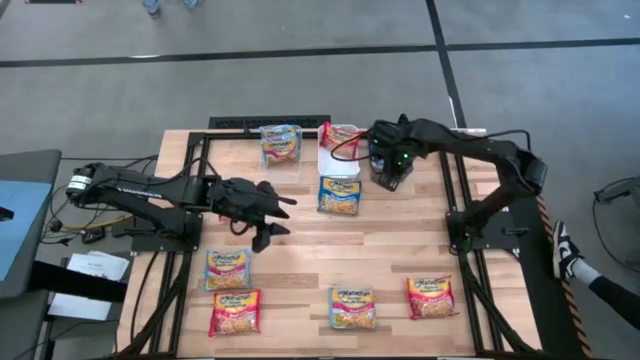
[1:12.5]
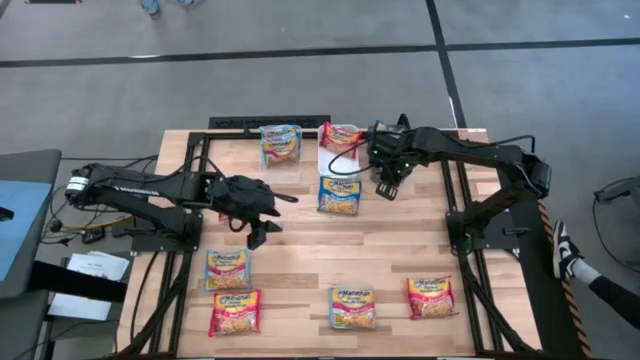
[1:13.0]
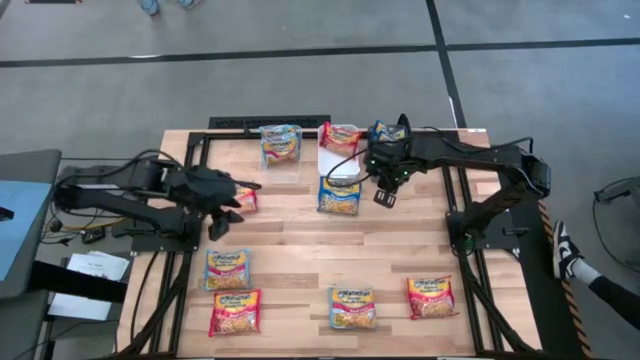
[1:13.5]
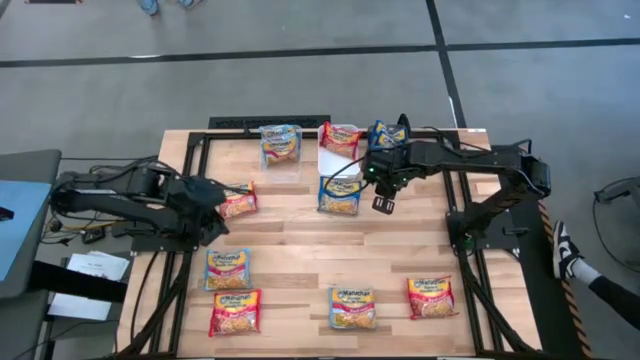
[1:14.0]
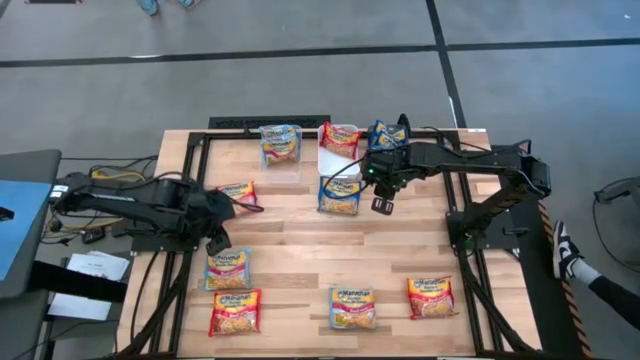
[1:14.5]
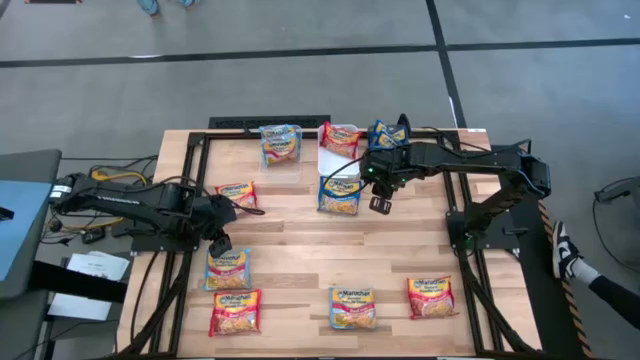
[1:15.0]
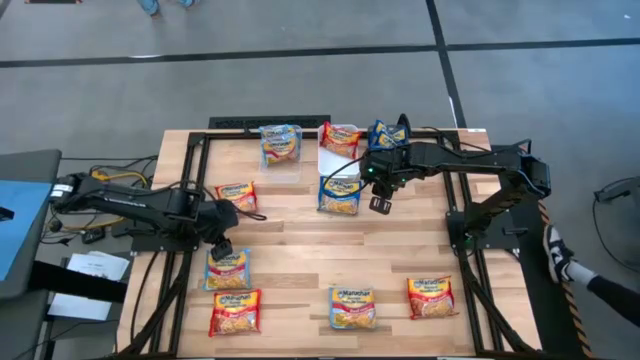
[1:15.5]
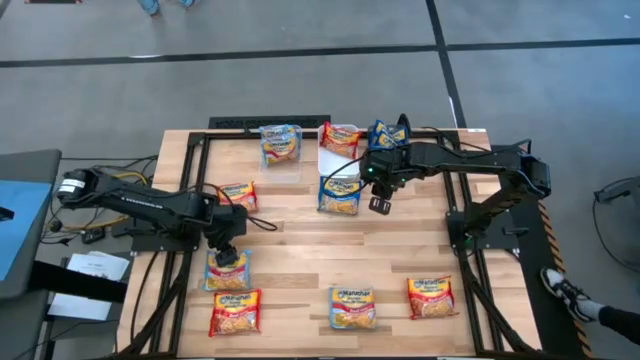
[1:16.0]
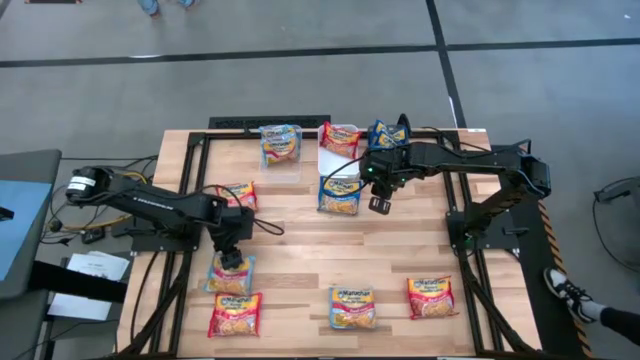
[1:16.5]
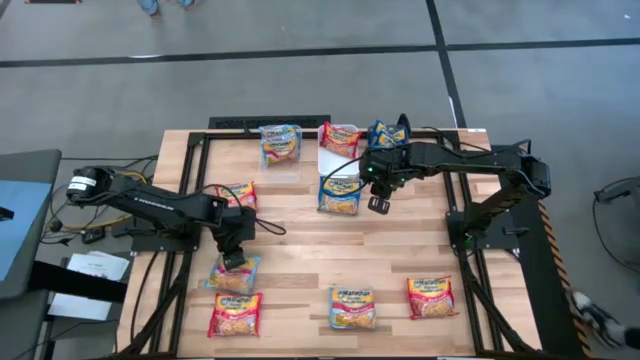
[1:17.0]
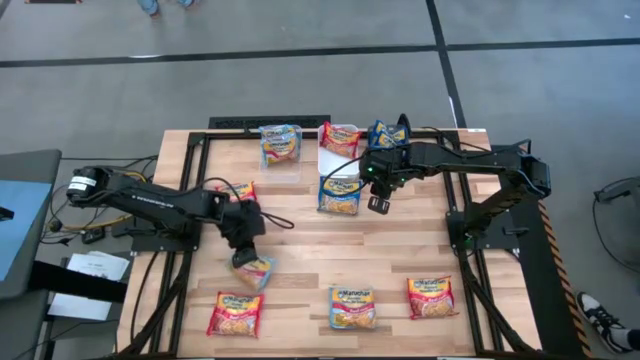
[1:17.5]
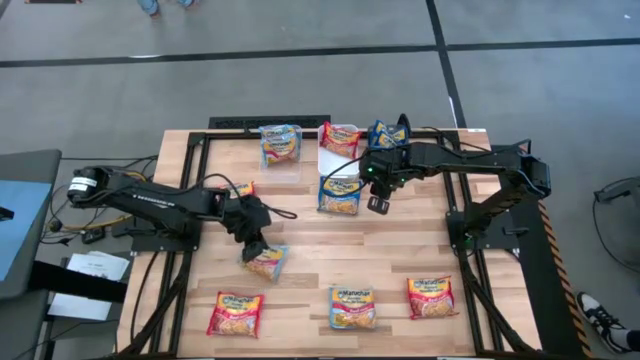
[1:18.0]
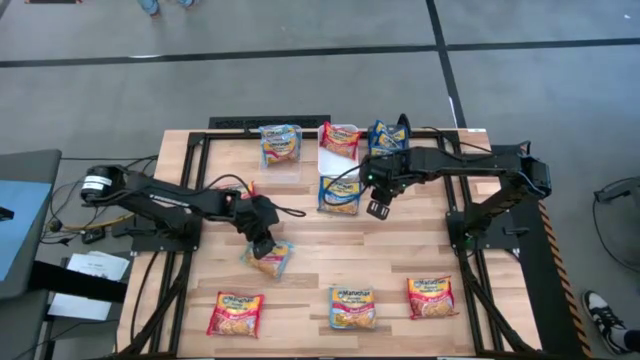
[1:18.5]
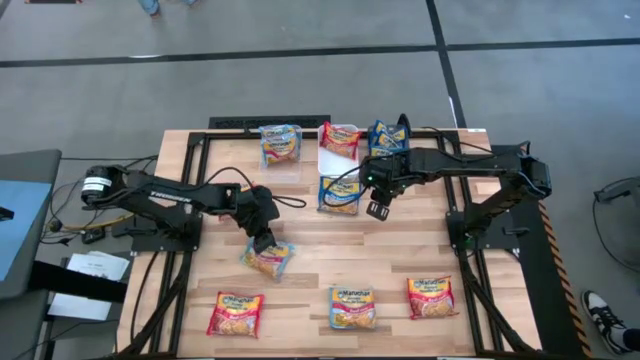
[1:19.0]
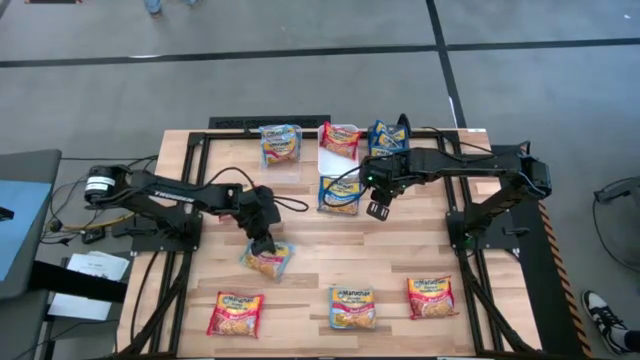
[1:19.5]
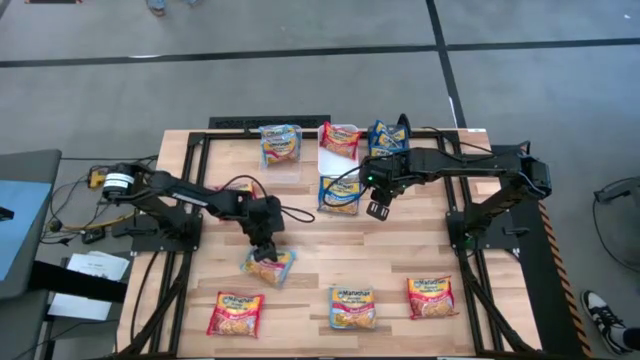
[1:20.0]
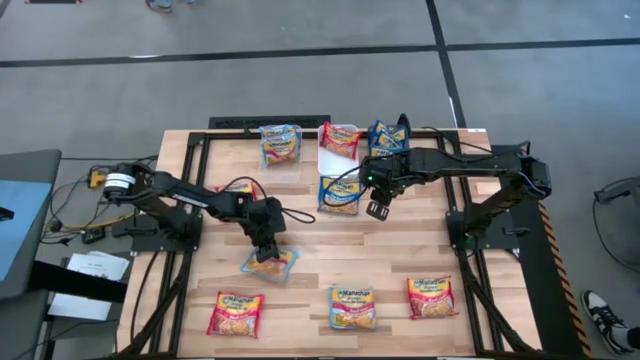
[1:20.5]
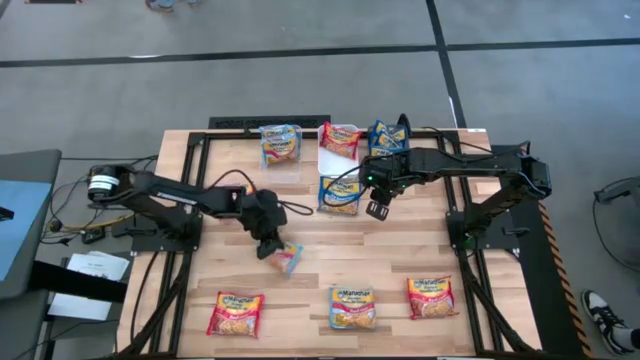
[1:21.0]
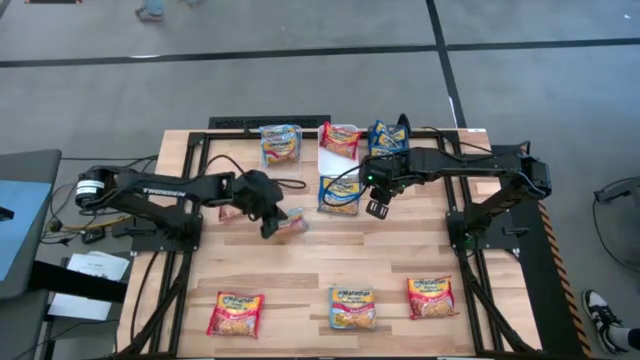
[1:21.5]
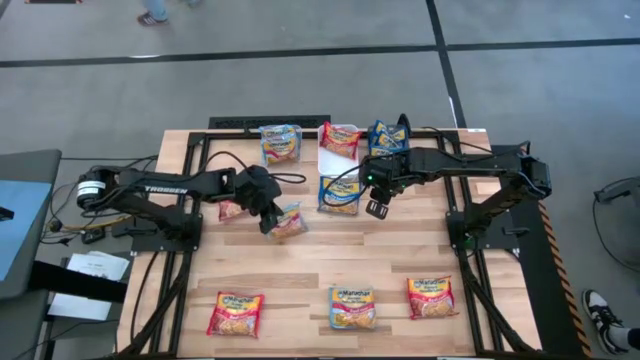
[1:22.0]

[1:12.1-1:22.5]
Task: Sort Maruchan noodles
Put the light blue noodle pack into the transparent bin

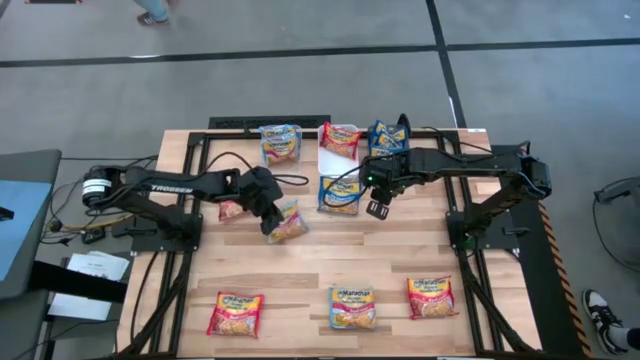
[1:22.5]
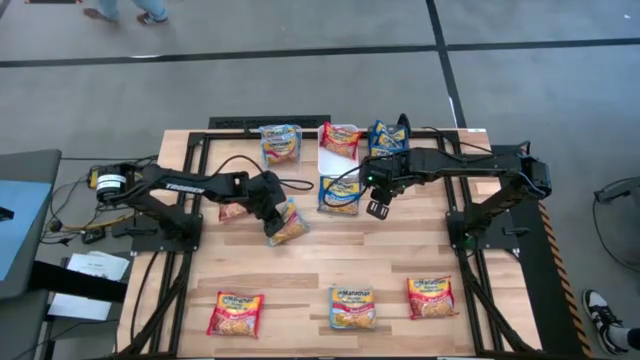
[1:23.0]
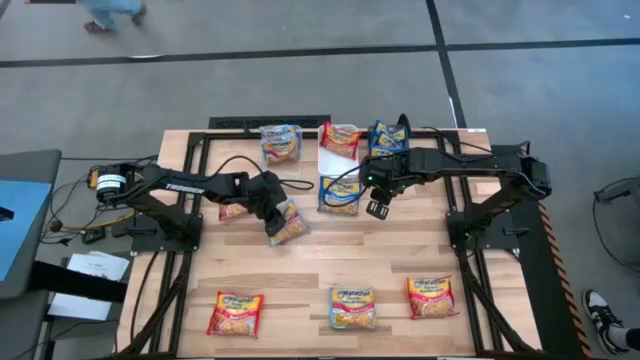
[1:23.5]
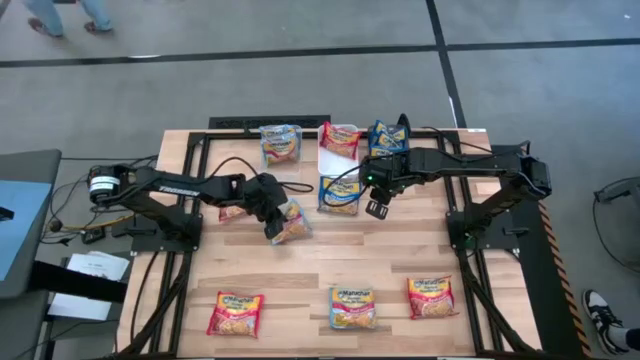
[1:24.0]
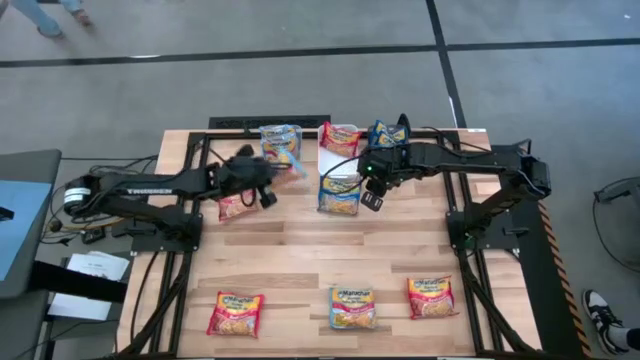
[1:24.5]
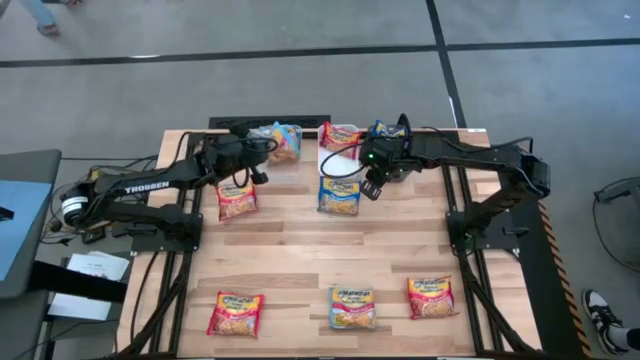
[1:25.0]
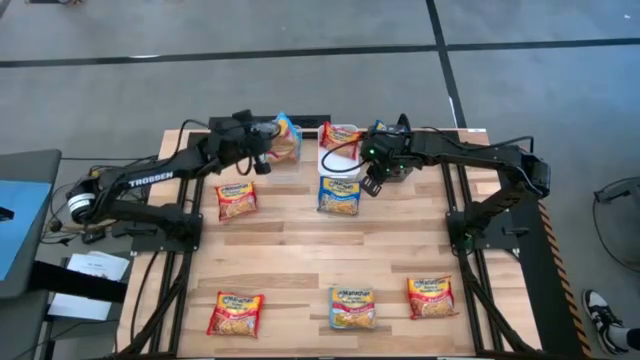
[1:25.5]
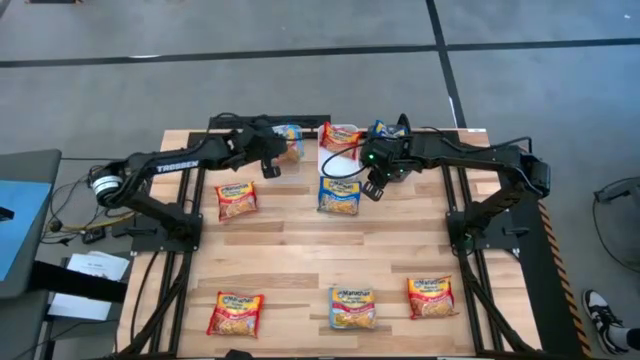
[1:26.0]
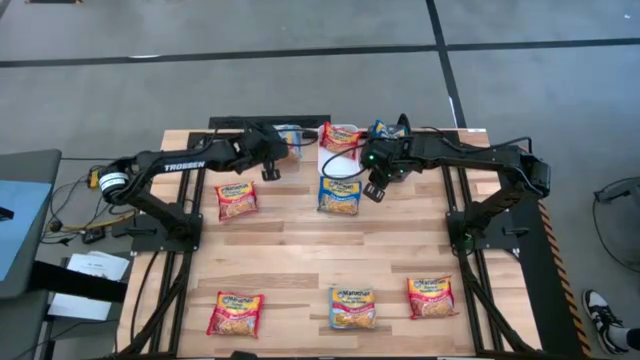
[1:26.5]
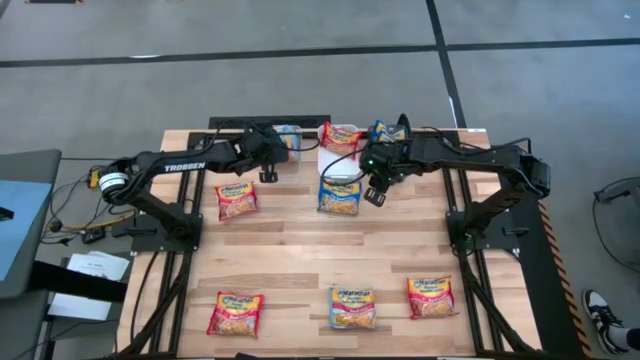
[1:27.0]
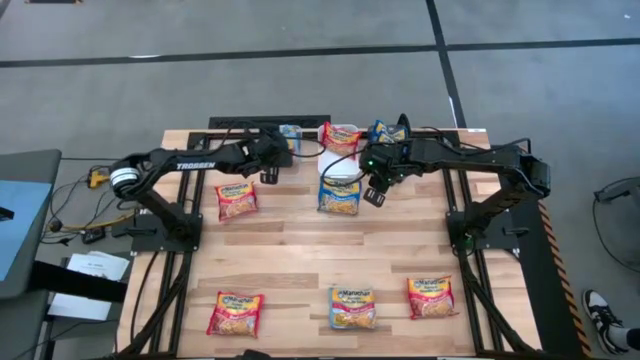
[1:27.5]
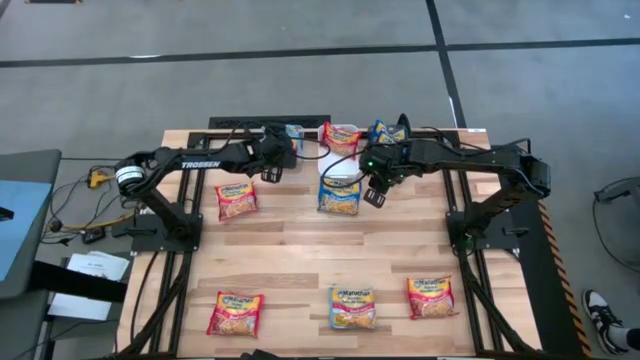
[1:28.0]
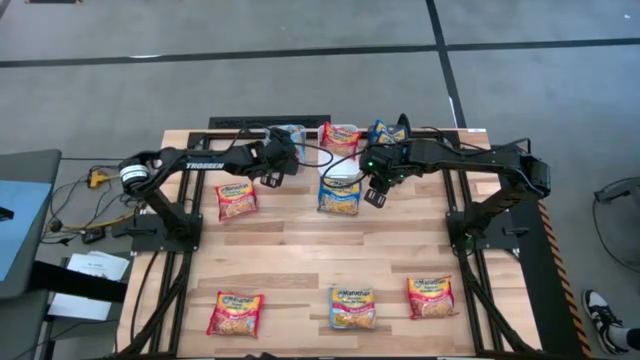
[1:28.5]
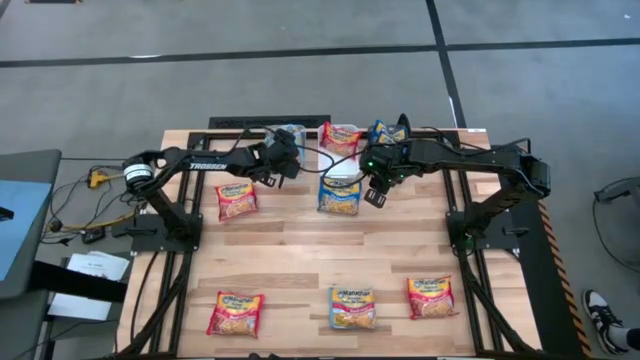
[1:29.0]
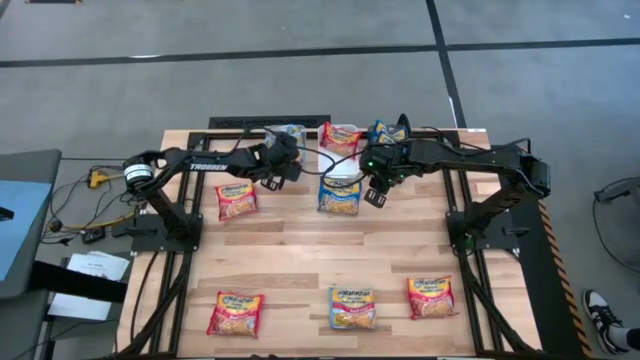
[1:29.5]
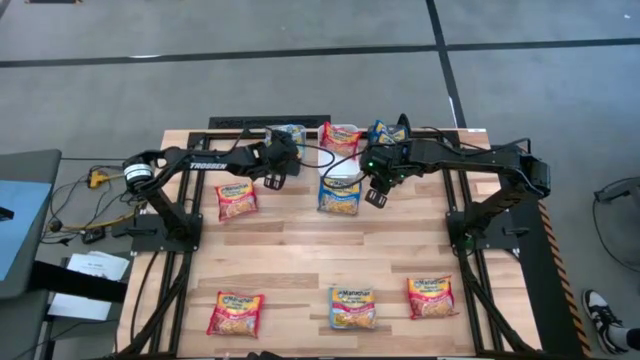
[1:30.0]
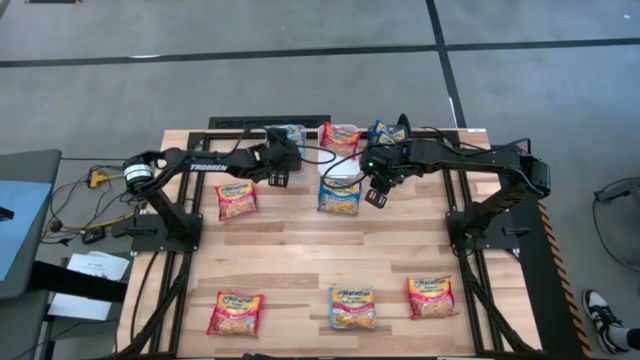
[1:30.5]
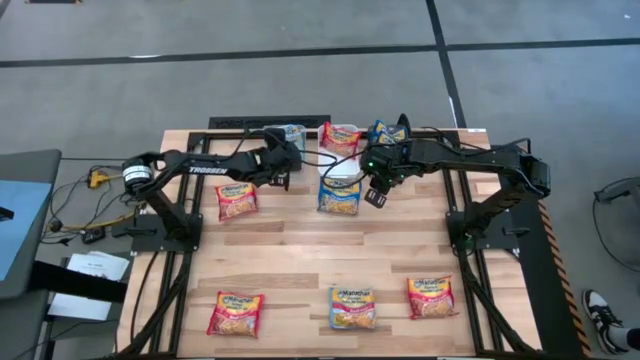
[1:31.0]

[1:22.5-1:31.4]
Put the light blue noodle pack into the transparent bin

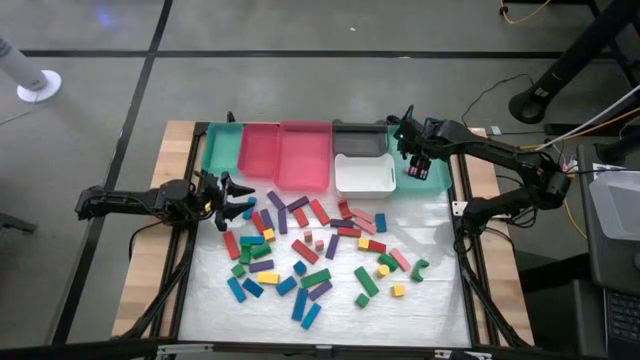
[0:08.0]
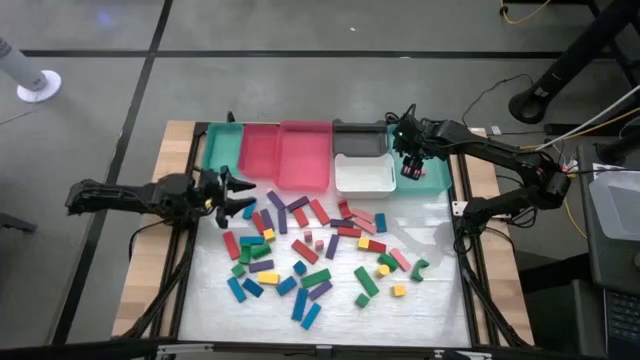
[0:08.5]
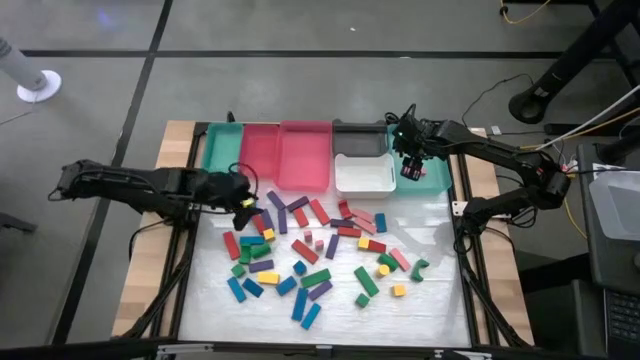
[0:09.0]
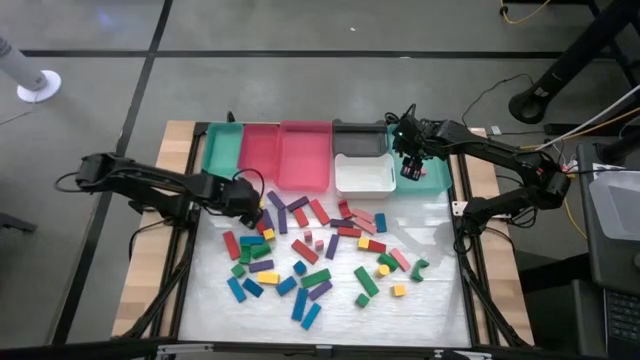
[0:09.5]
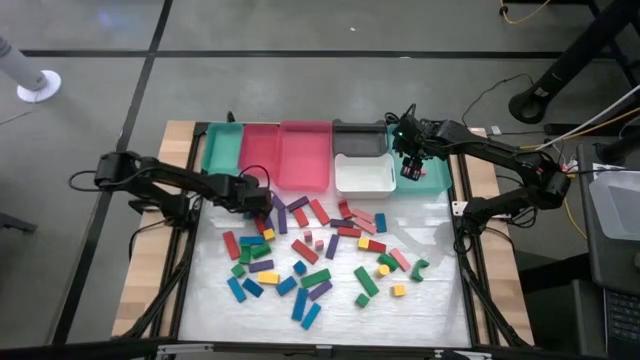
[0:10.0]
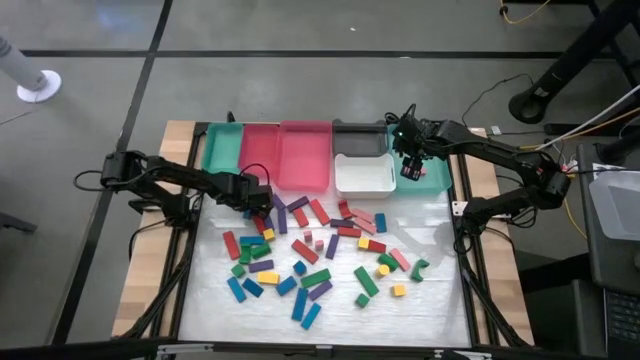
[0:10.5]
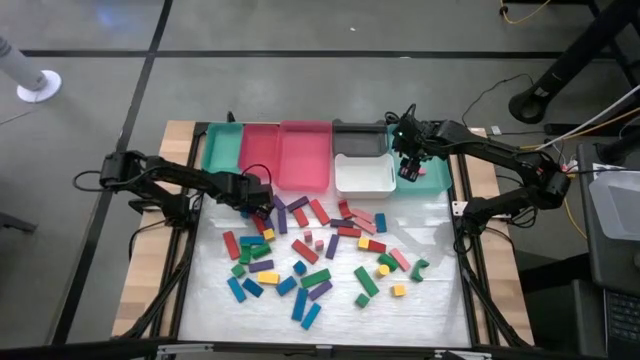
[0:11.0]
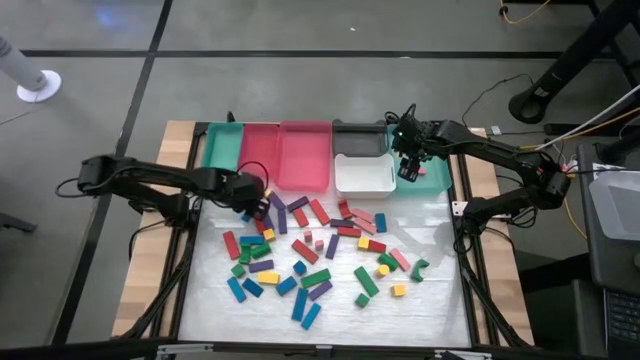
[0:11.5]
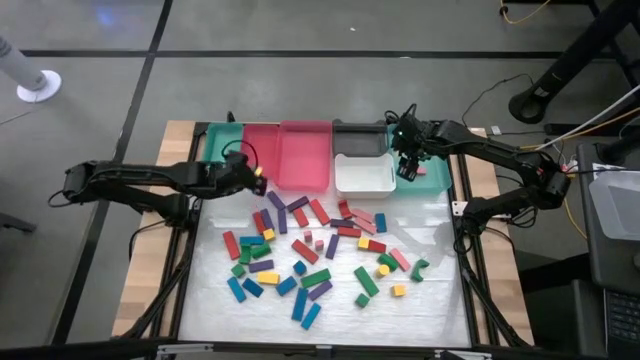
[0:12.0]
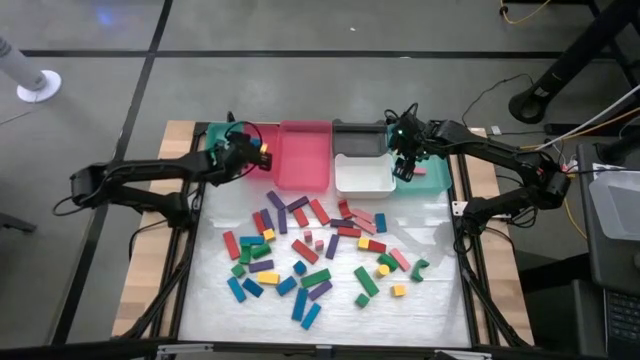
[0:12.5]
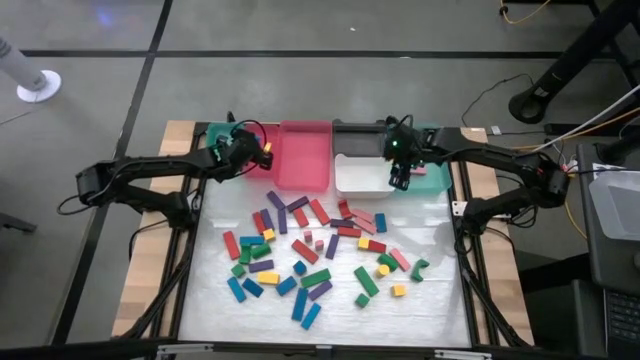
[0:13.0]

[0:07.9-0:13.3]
Task: Sort blocks
Put the blue block into the left pink bin
